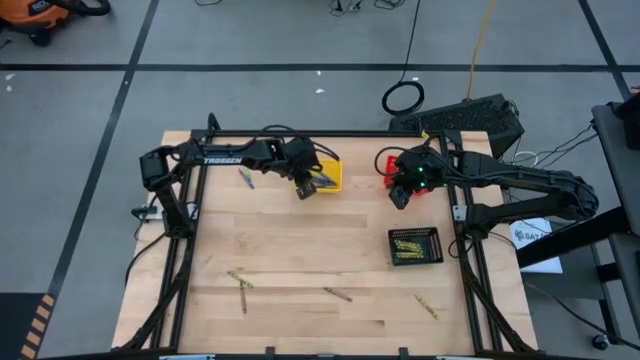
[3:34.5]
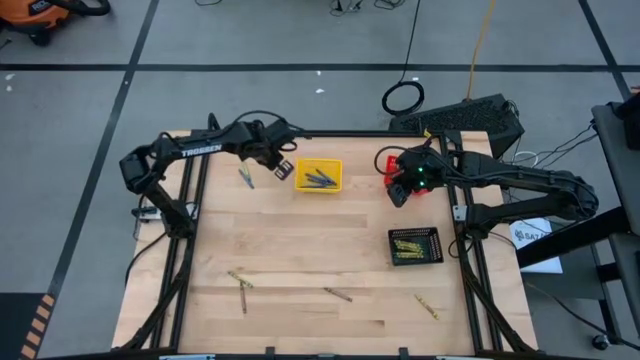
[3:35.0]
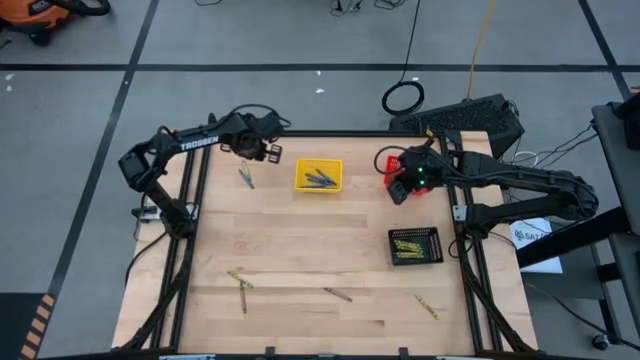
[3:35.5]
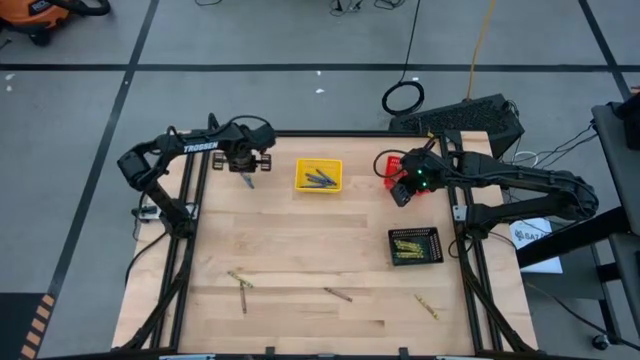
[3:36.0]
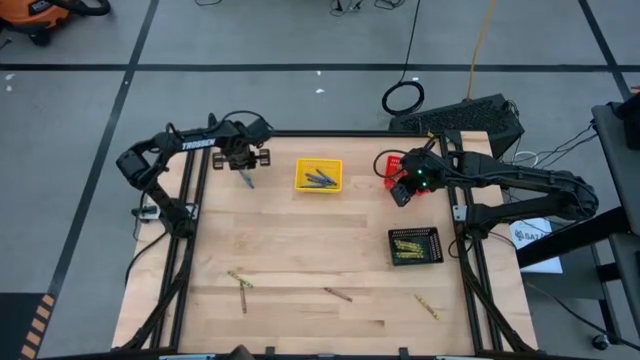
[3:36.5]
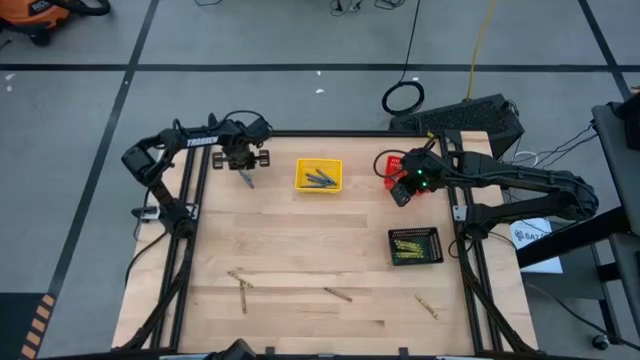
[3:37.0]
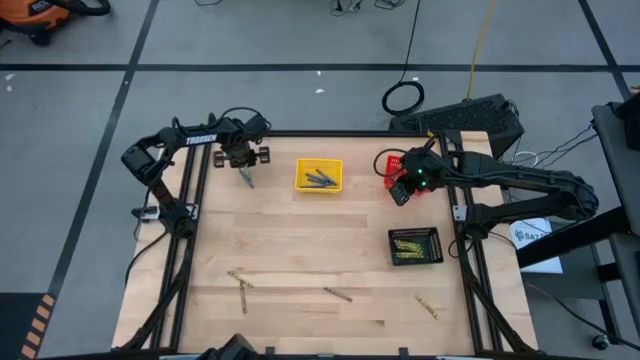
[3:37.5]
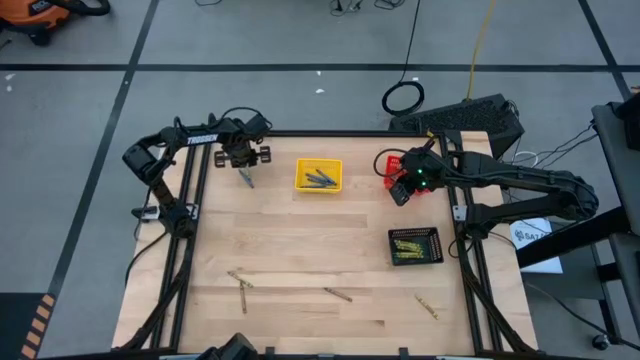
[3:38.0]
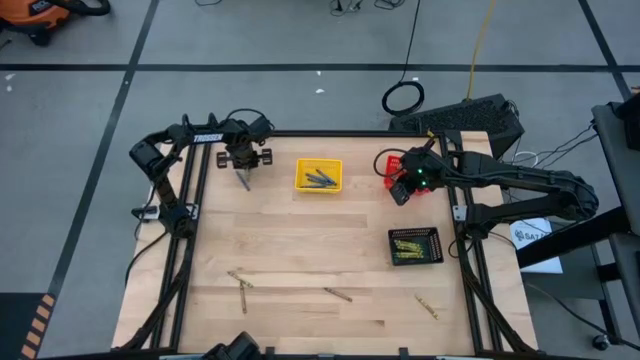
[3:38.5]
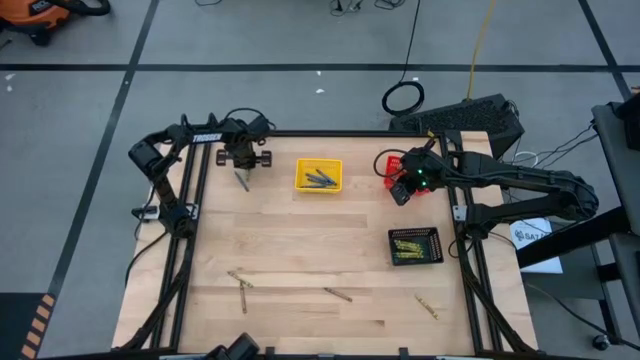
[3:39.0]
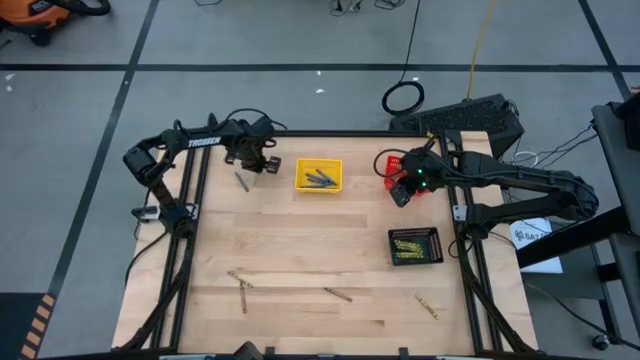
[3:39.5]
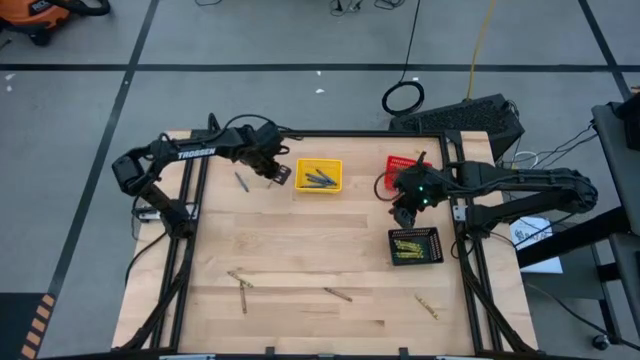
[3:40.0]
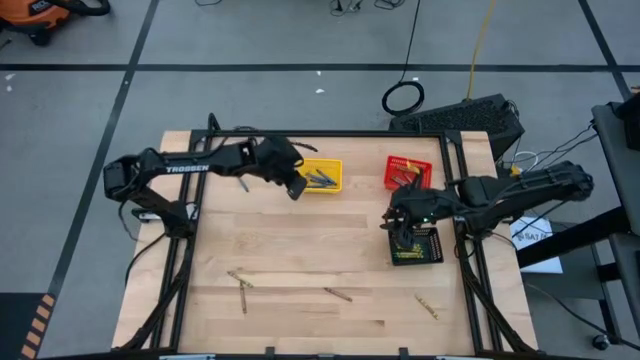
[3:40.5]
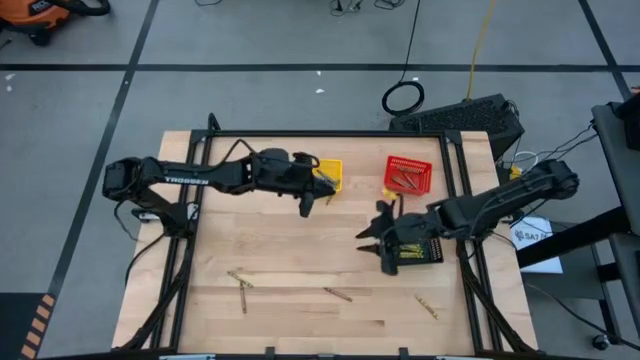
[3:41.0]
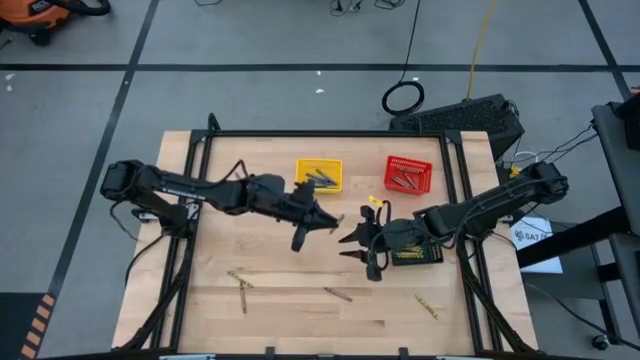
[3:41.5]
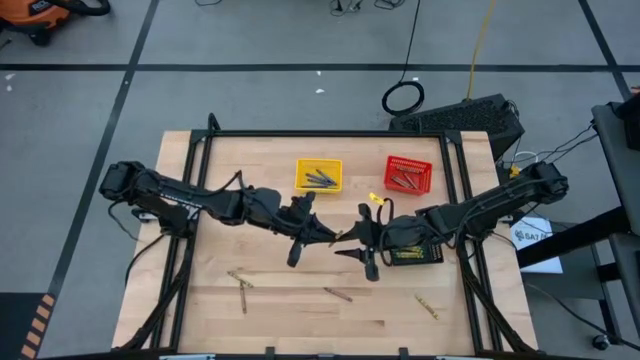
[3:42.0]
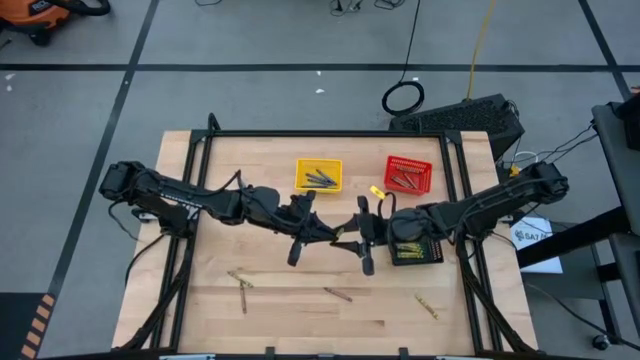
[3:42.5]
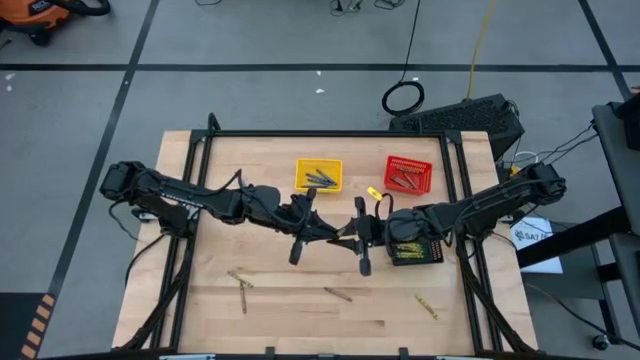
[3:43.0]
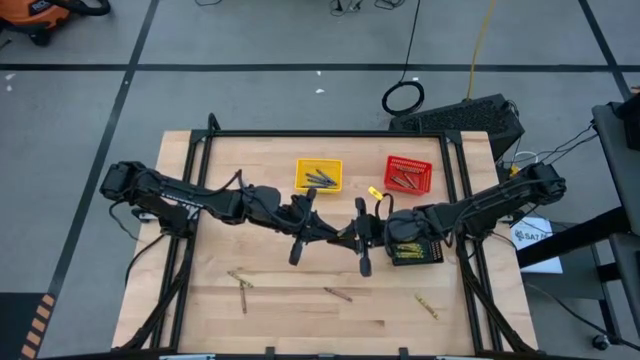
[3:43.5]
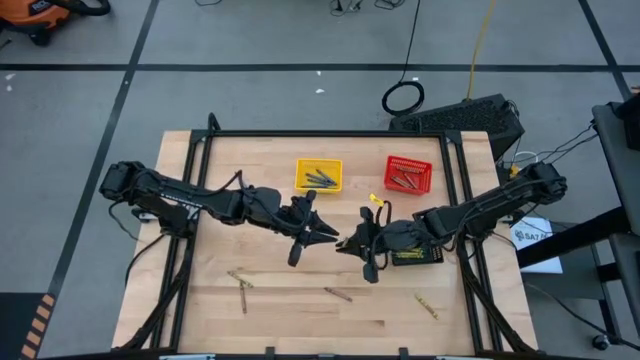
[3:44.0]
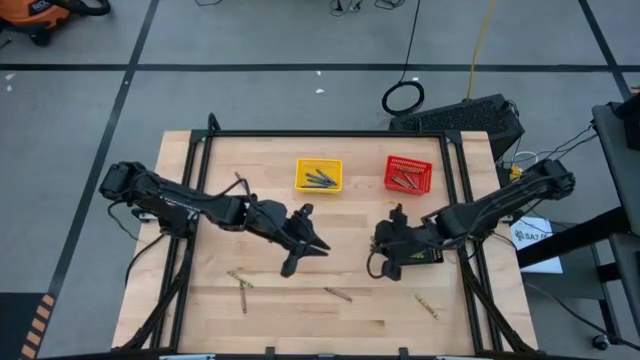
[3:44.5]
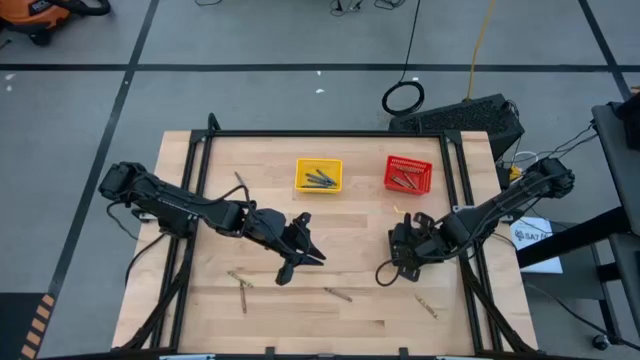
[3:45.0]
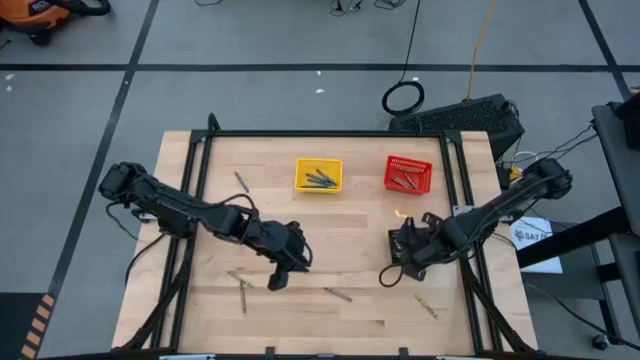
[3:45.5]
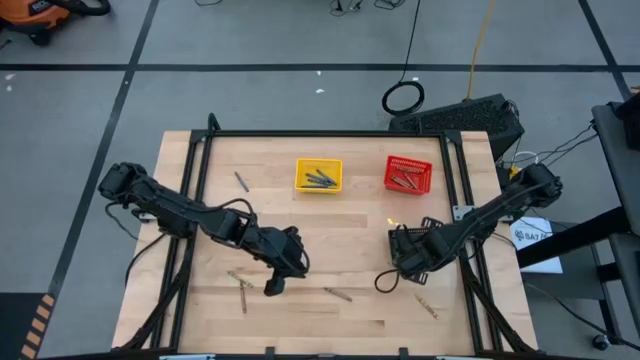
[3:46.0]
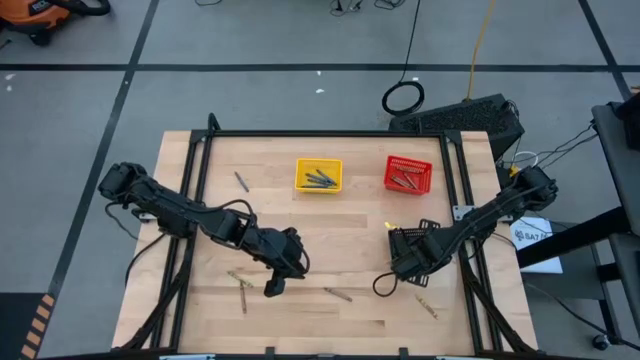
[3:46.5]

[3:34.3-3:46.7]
Task: Sort crayons
Put the green crayon into the black bin

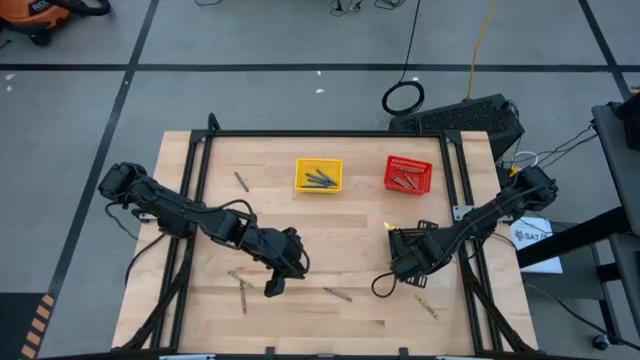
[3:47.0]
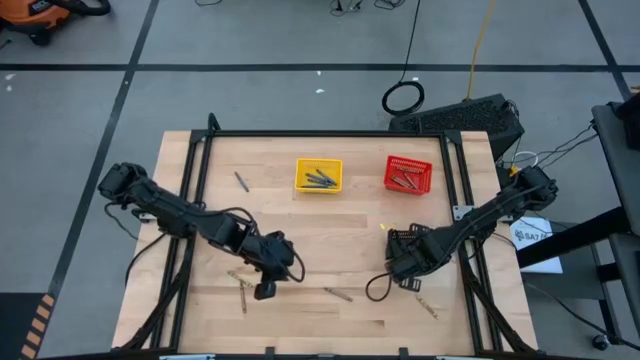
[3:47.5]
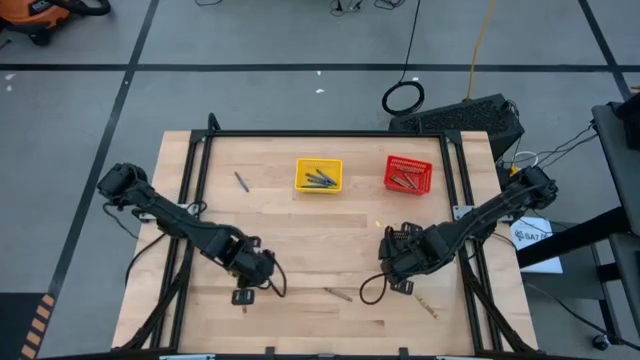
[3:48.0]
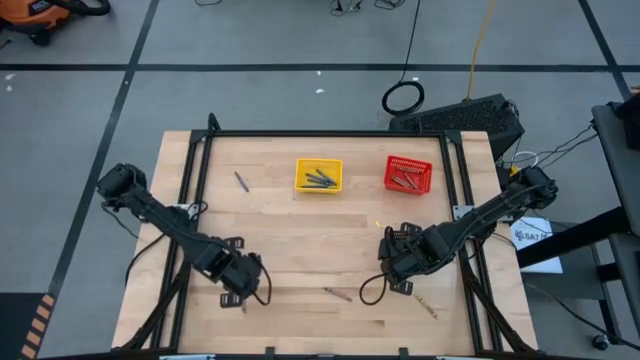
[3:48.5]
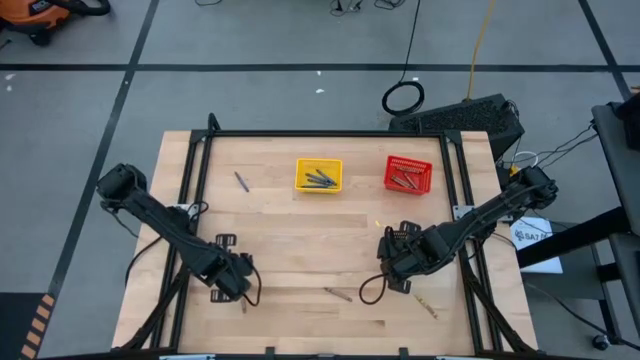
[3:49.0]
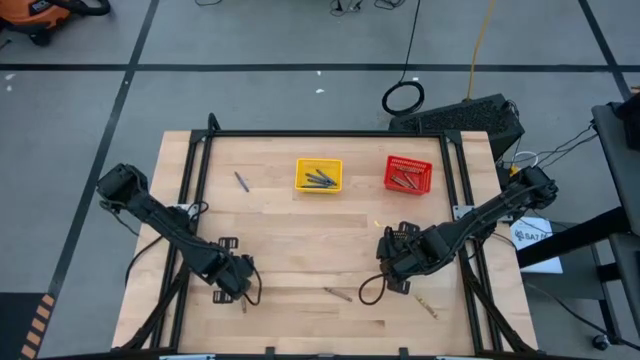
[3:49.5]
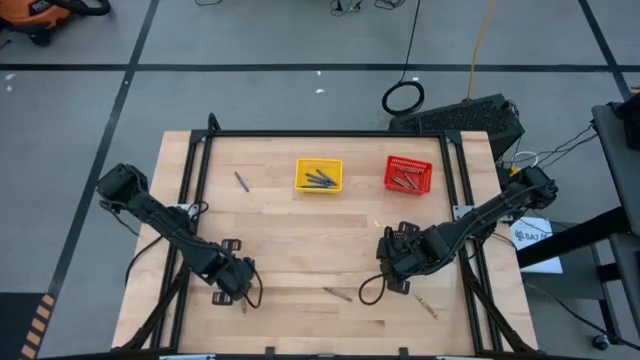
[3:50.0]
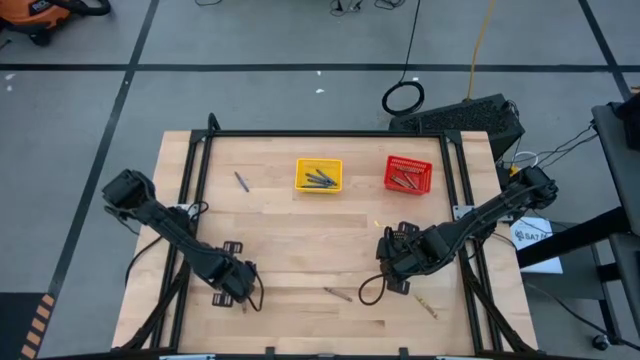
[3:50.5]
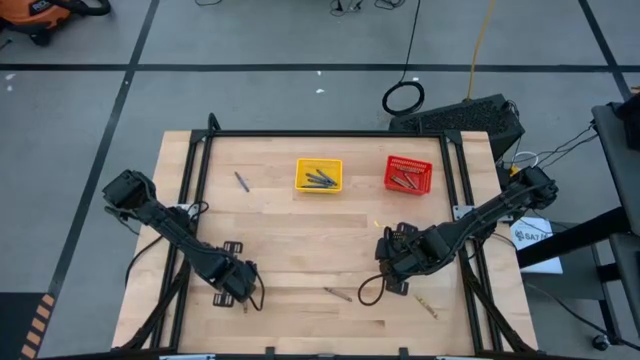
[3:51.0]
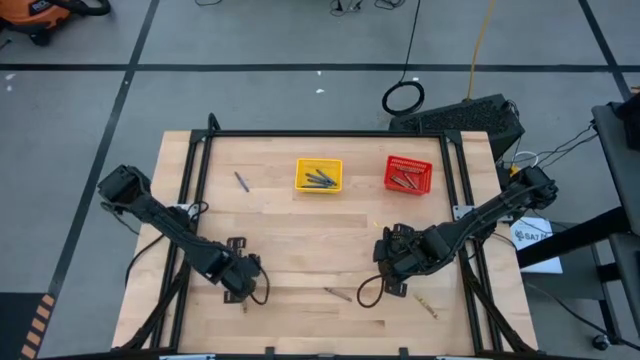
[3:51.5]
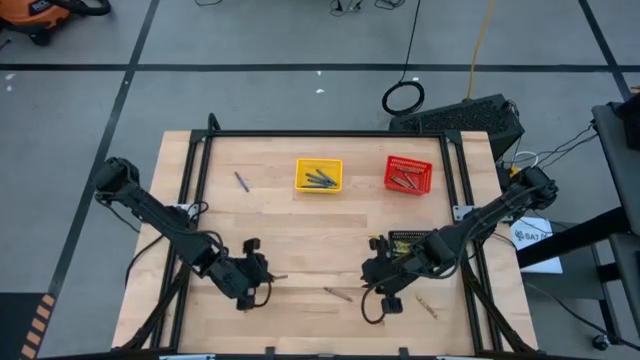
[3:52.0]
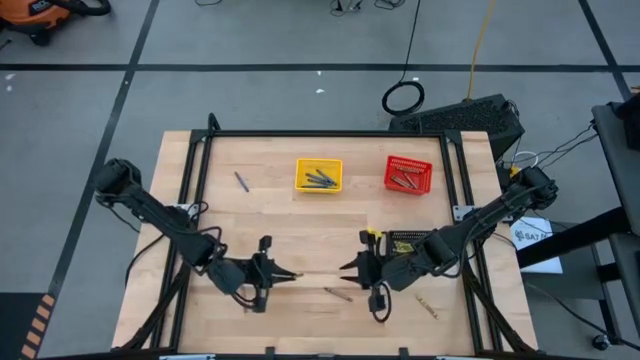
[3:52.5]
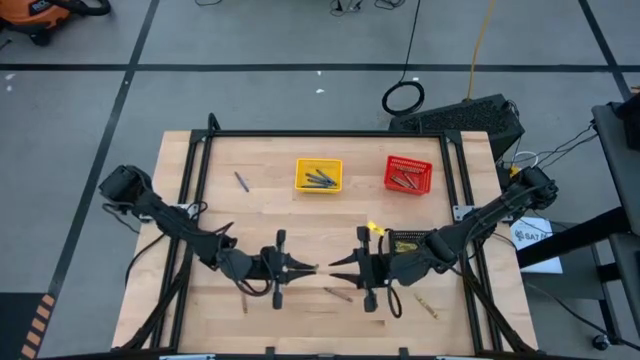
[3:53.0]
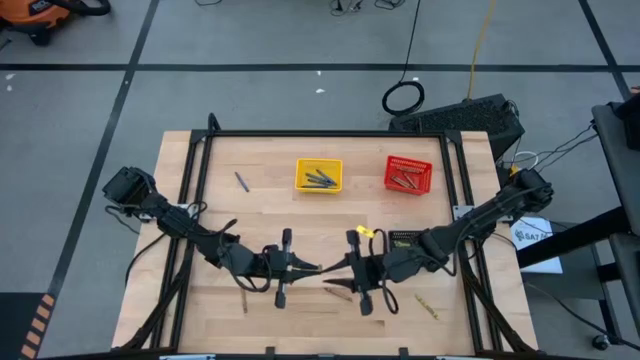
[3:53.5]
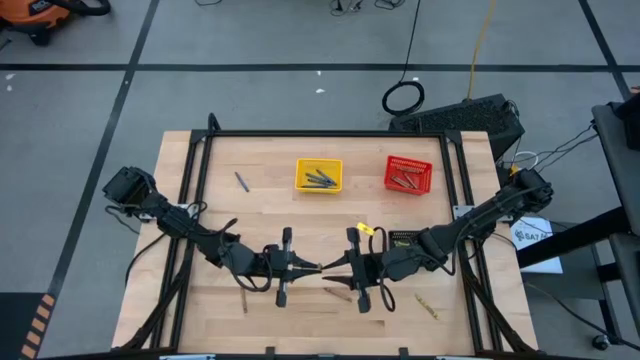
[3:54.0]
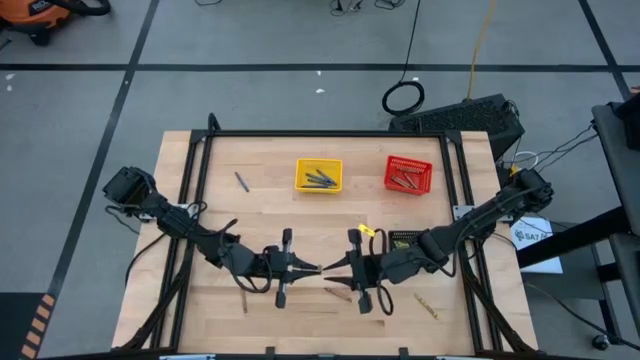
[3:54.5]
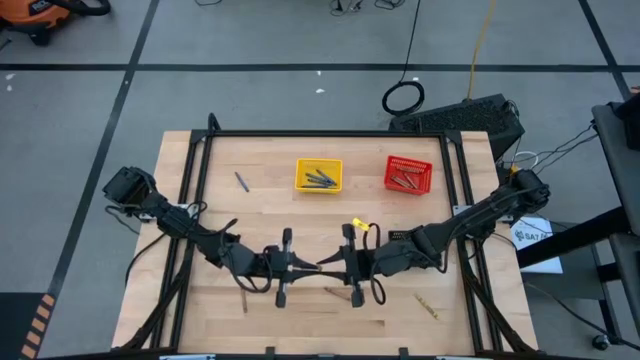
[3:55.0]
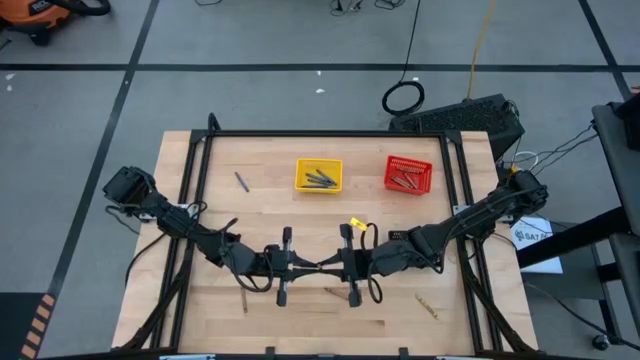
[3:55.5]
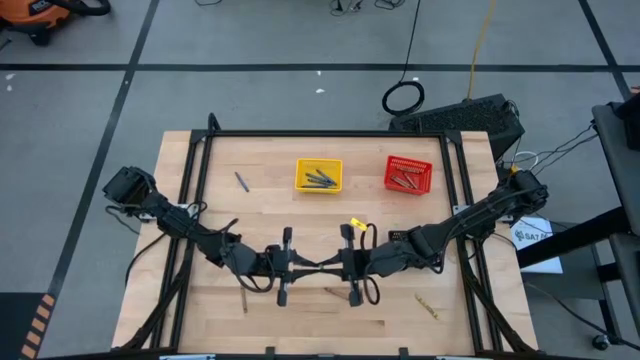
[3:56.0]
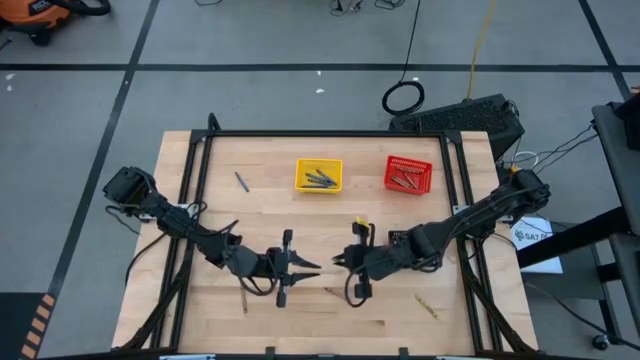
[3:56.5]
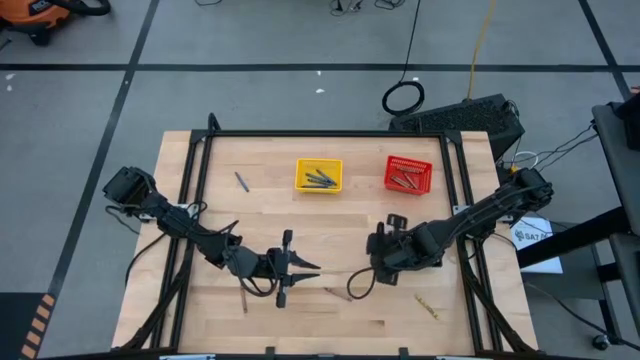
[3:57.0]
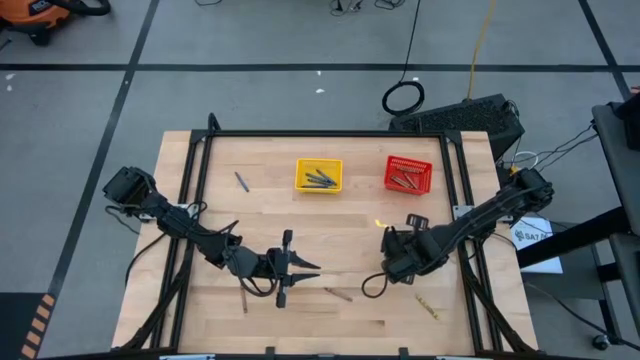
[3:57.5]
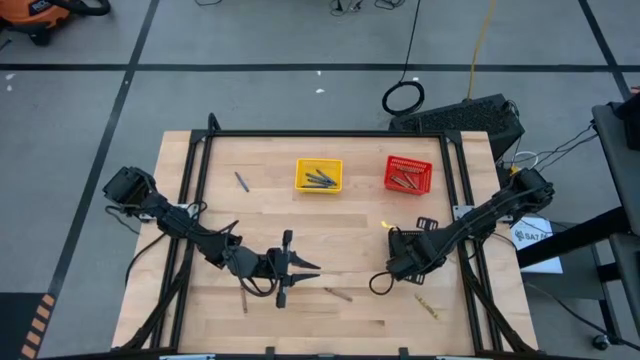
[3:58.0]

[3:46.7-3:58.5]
Put the green crayon into the black bin
